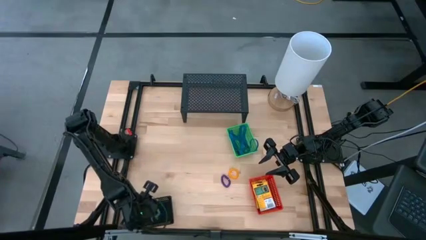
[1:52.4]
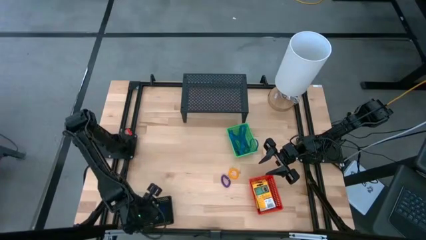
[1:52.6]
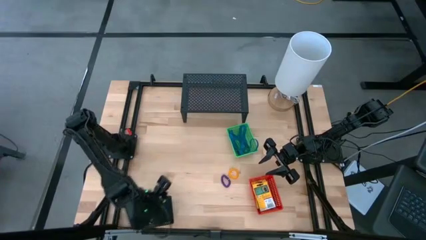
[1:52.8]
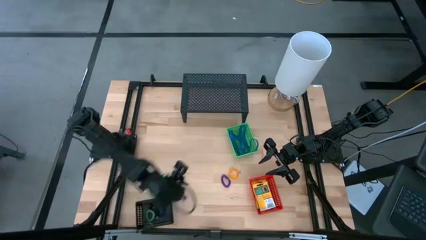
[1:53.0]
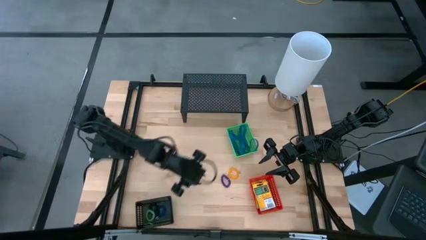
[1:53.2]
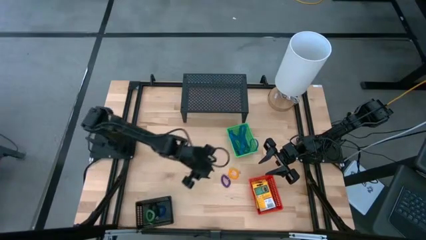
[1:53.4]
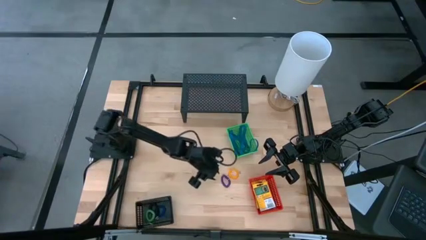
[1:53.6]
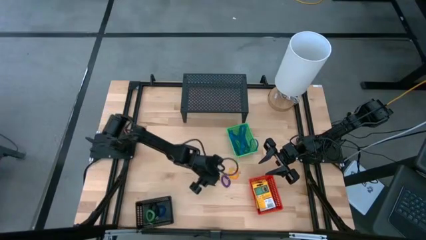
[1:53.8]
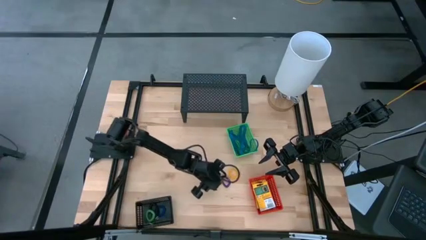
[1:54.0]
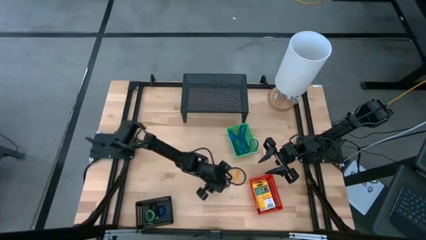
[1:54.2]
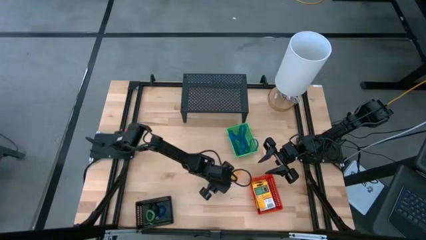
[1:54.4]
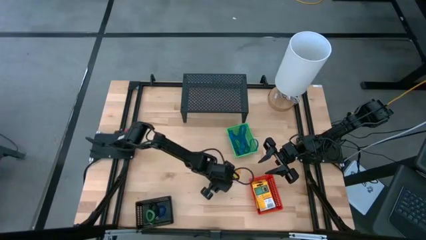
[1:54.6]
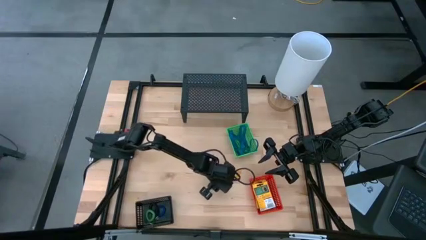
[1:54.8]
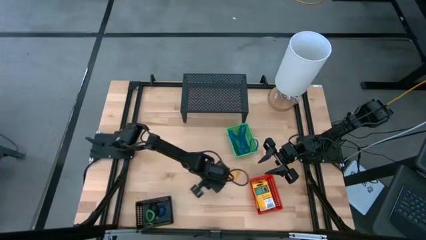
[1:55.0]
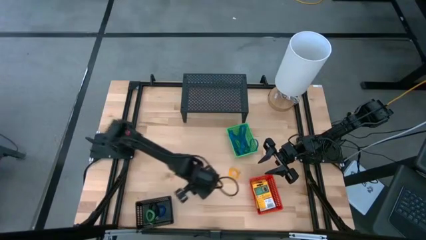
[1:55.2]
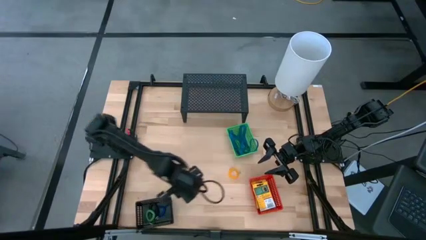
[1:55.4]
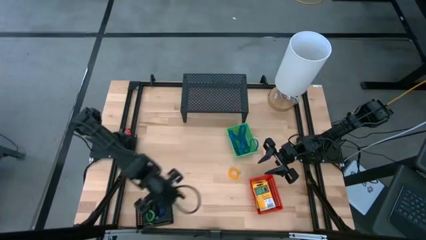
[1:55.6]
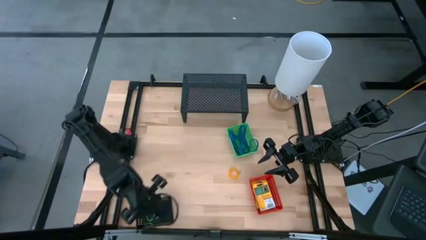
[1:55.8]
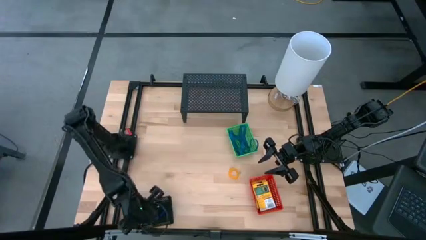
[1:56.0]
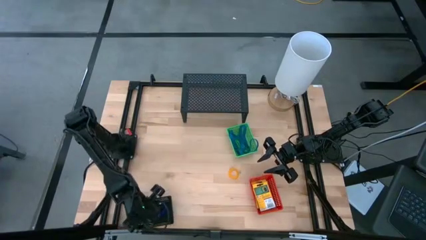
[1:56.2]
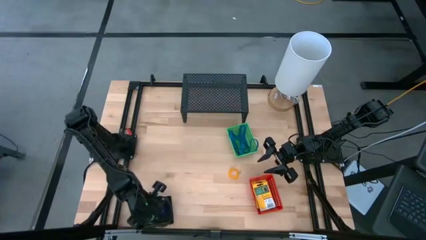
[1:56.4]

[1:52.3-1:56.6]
Task: Pick & Place Office Desk Supplies
Put the violet spring keychain into the black basket

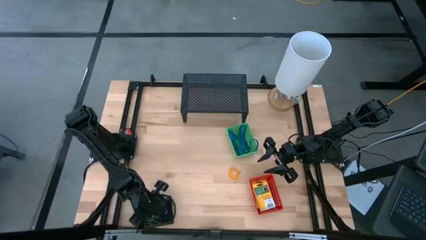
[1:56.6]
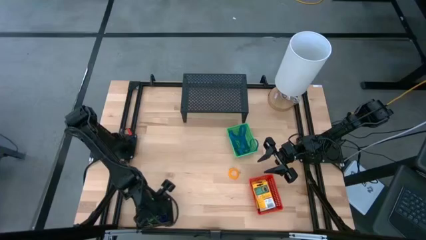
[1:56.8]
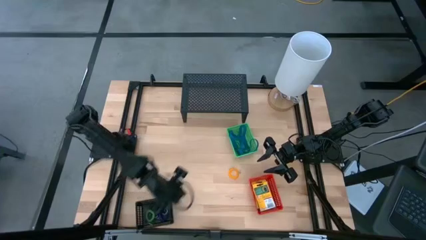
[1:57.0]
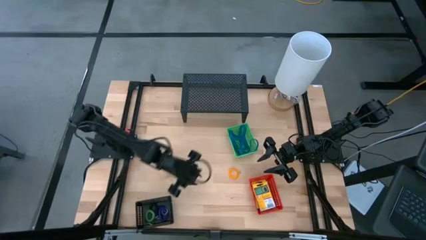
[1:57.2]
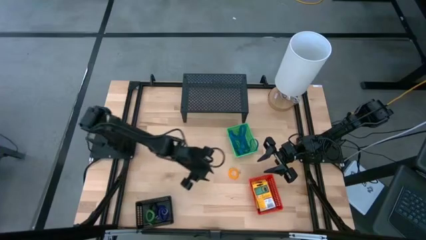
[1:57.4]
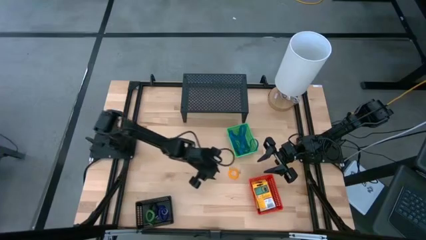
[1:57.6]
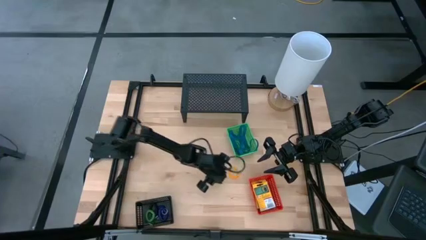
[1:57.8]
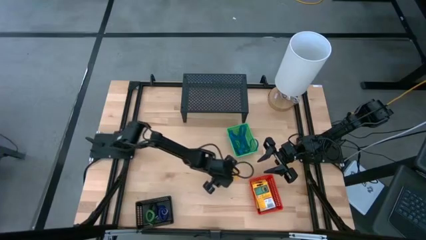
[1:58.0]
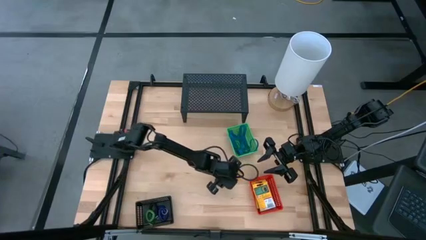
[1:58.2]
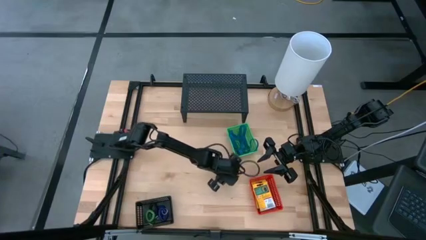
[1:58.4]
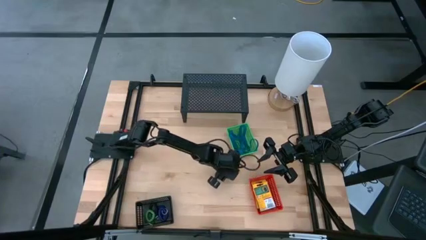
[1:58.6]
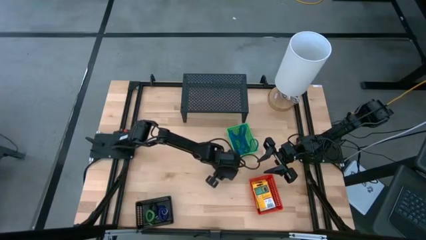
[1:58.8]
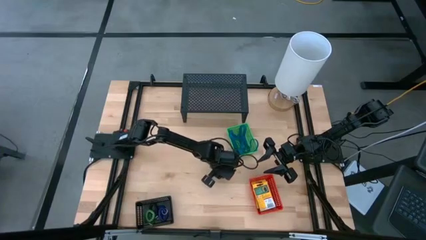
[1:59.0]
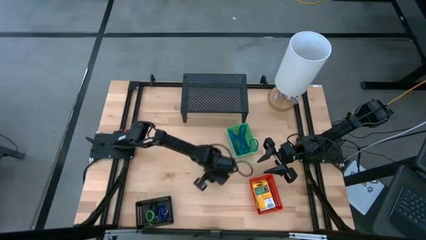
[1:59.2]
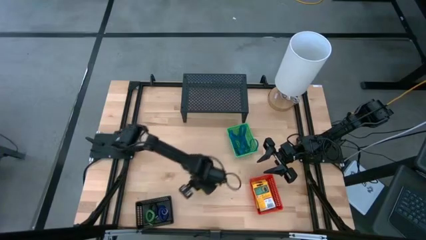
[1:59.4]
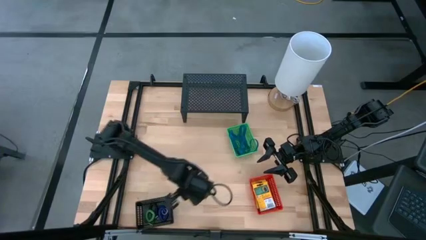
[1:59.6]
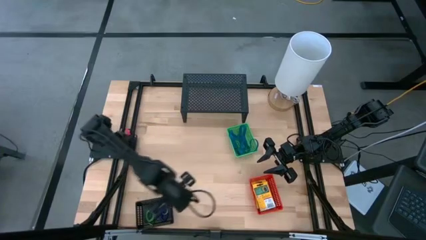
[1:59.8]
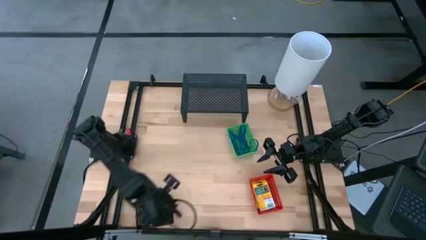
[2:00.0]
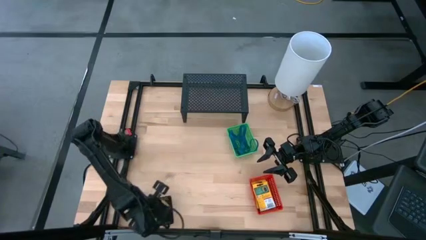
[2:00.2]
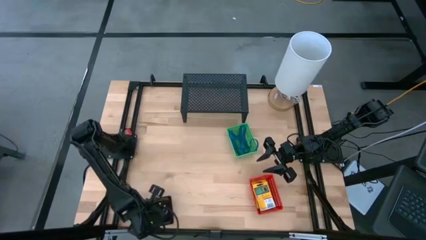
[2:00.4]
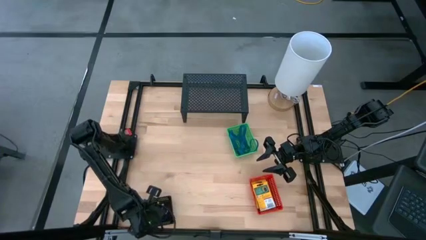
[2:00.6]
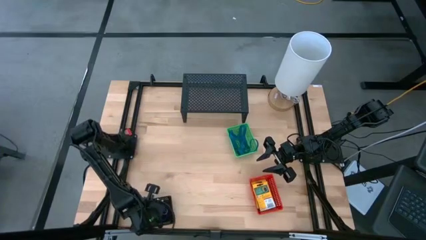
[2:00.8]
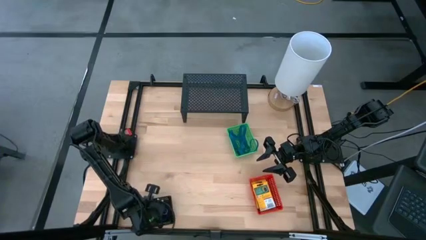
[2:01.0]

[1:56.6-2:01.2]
Put the orange spring keychain into the black basket

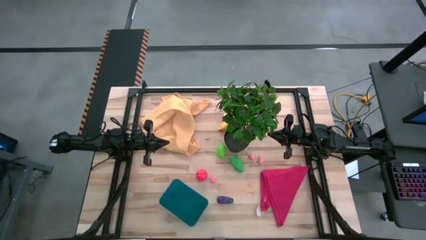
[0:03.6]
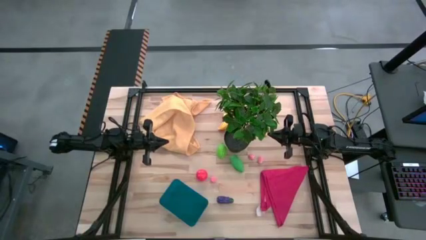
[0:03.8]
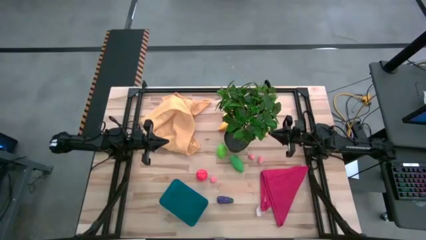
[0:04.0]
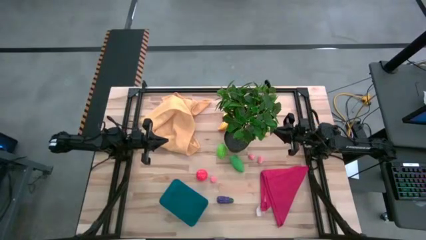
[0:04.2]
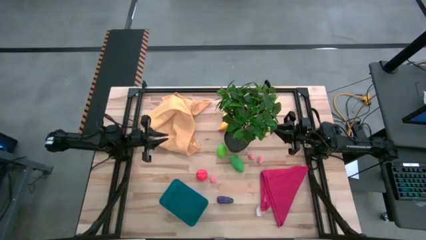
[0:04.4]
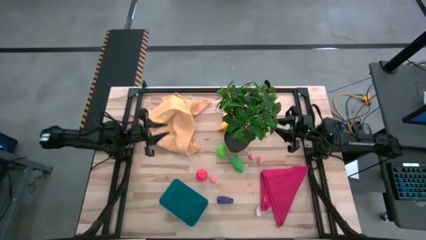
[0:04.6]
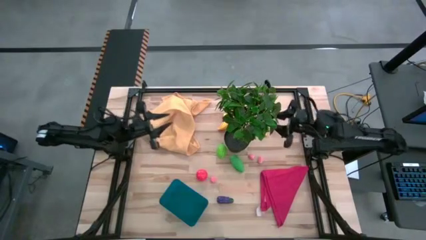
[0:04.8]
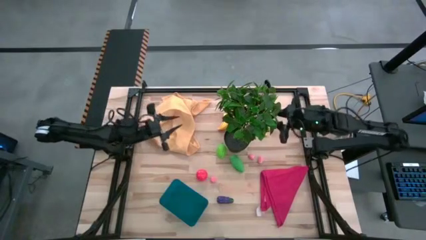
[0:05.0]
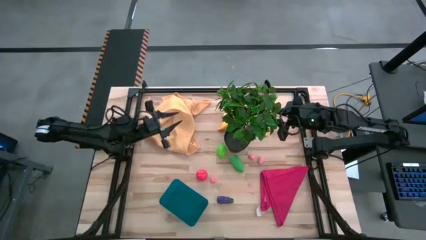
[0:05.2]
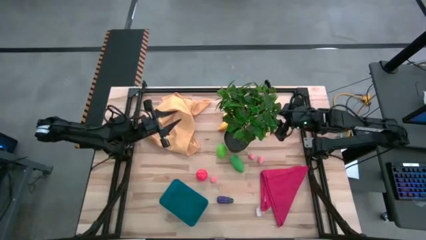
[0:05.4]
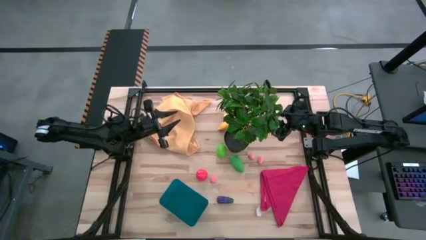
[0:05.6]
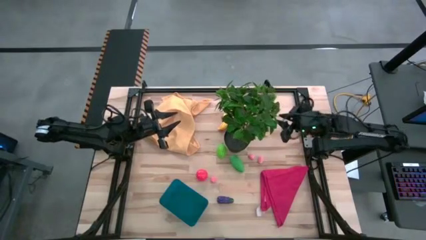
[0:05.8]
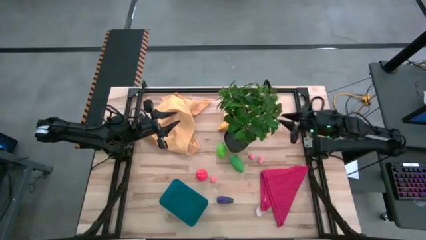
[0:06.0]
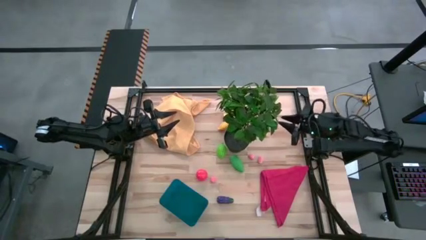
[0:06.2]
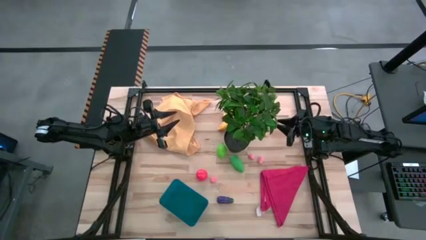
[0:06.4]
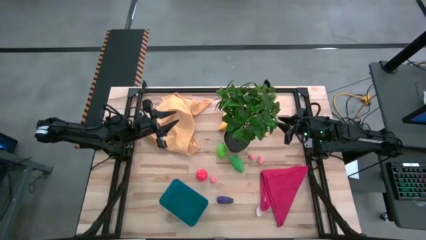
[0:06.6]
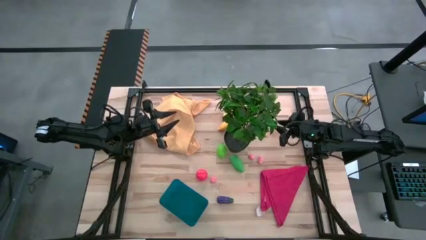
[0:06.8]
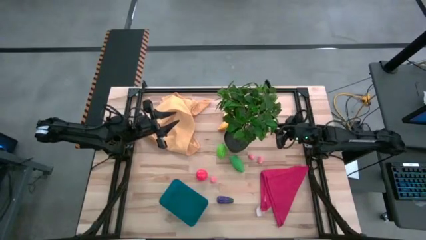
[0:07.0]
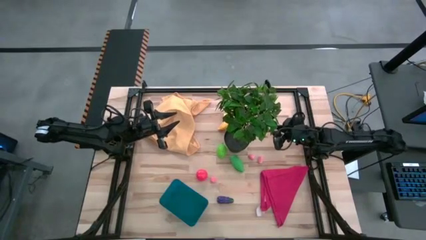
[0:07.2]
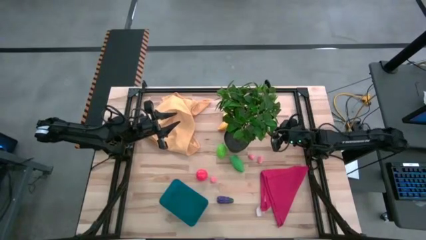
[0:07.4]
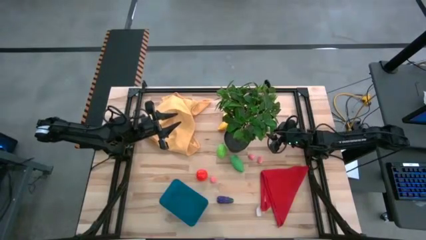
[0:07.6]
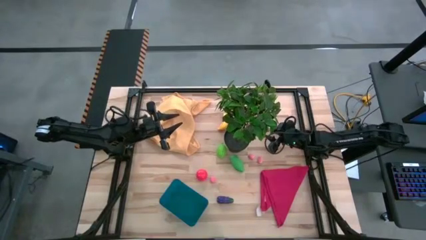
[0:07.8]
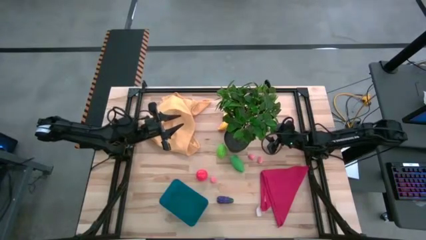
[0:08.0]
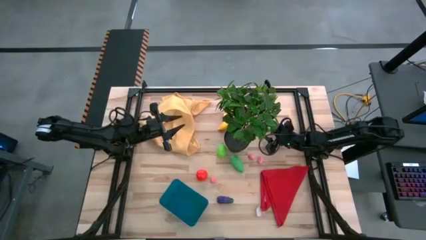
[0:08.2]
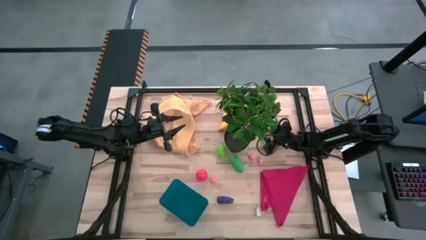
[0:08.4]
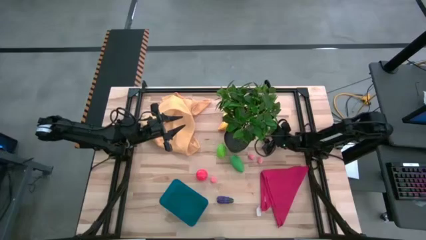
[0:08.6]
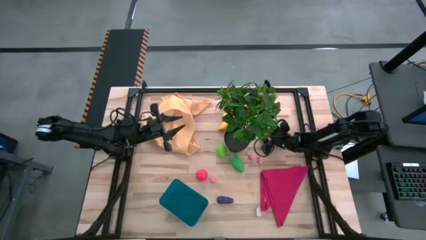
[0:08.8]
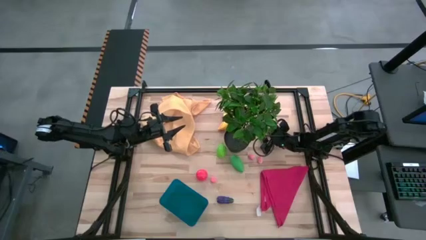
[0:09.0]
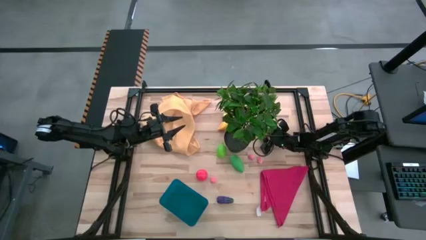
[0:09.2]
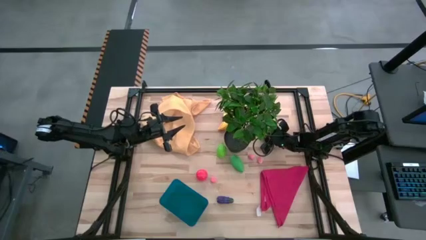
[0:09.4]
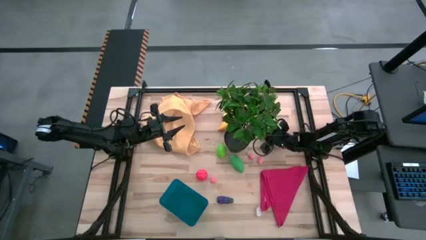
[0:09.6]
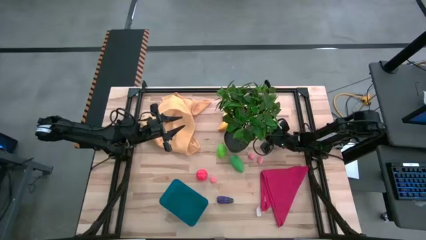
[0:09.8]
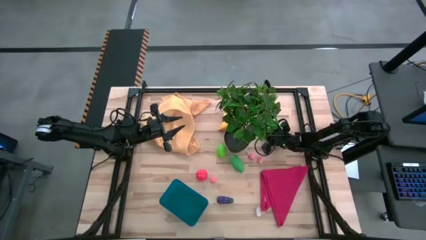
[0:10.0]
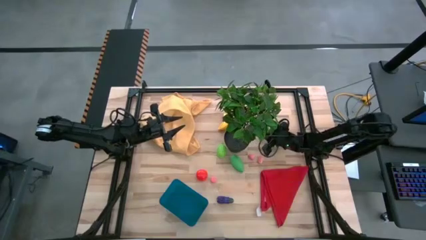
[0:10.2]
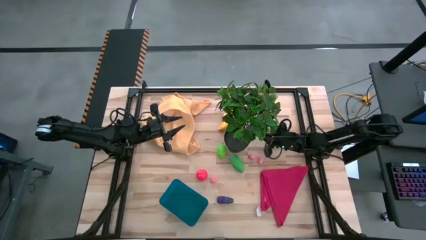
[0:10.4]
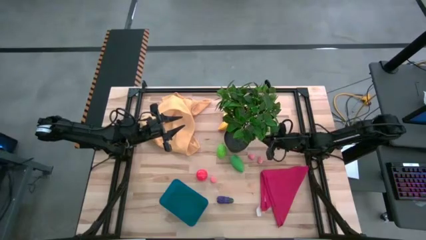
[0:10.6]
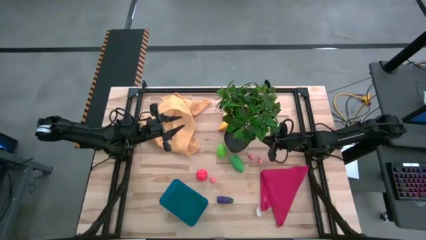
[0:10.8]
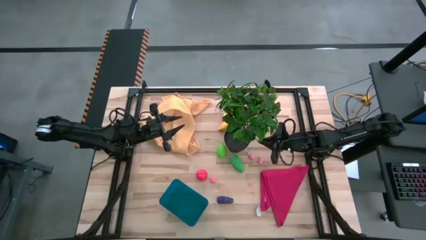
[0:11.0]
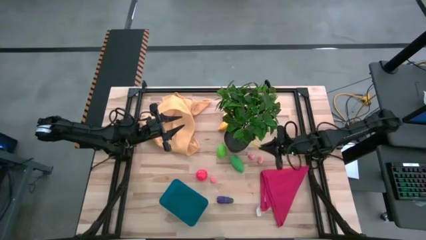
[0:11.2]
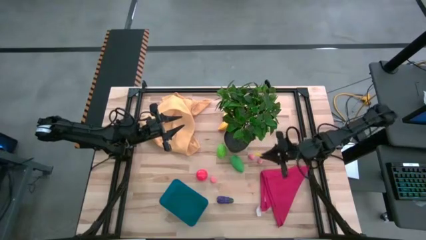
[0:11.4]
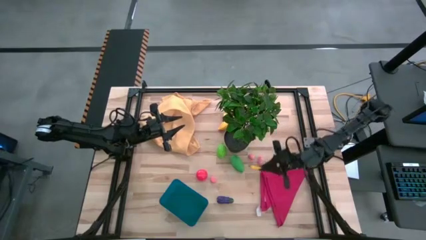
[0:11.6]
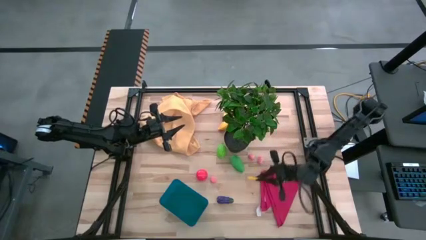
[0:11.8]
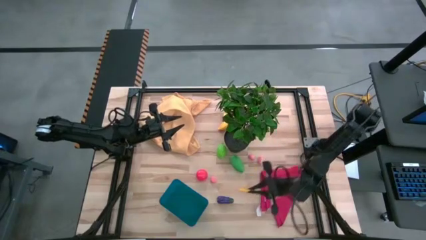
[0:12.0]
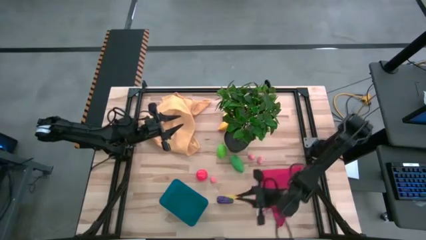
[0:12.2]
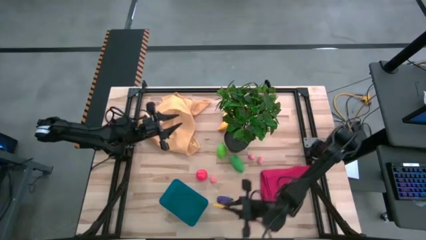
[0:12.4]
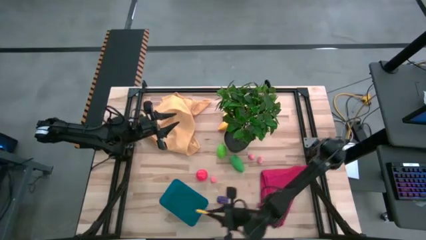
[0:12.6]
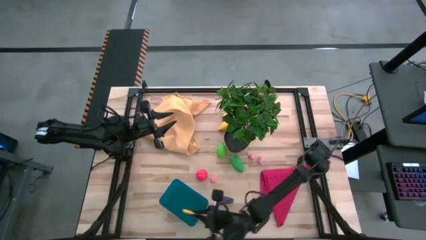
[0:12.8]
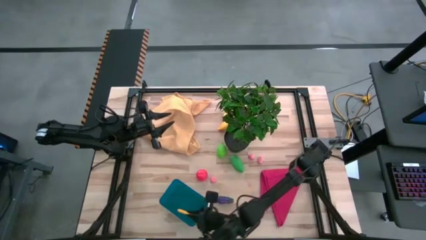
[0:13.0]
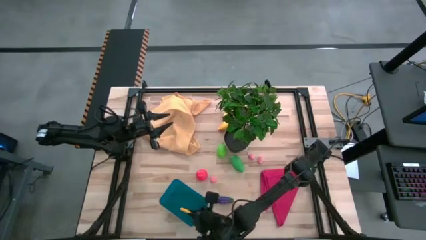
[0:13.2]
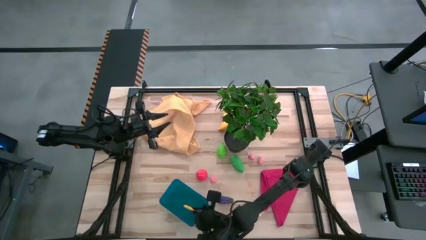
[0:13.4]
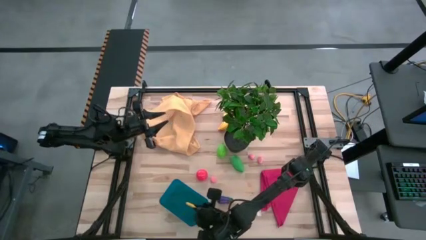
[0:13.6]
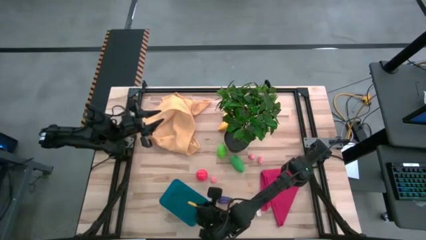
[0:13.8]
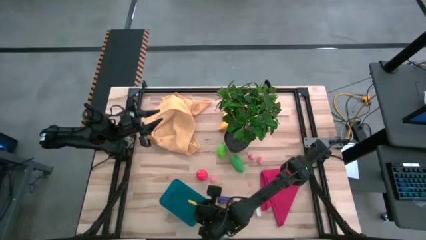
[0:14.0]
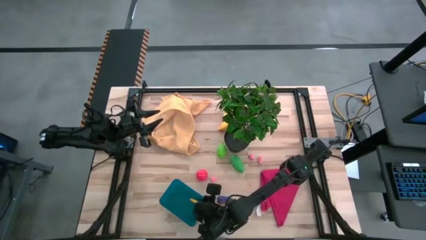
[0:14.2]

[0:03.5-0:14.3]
Task: Pick and placing Produce into tupperware
Put the yellow corn into the blue bin
